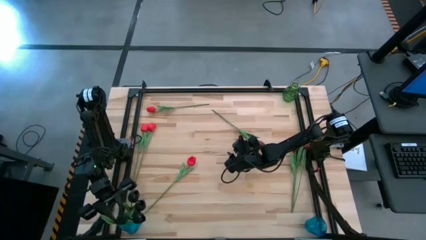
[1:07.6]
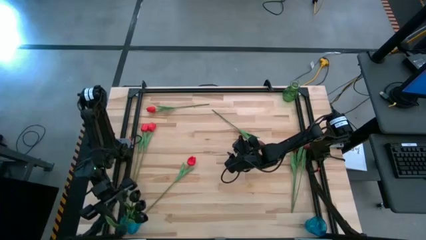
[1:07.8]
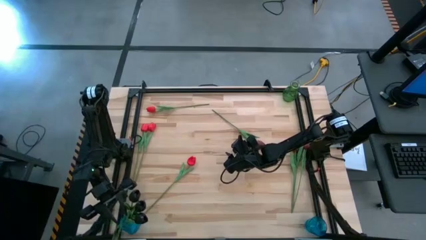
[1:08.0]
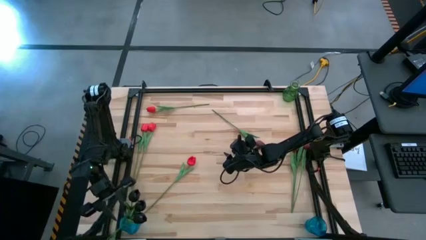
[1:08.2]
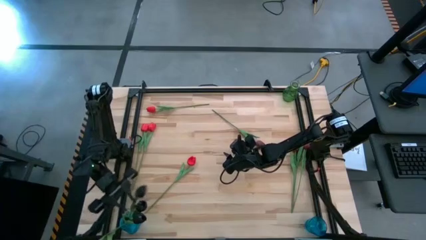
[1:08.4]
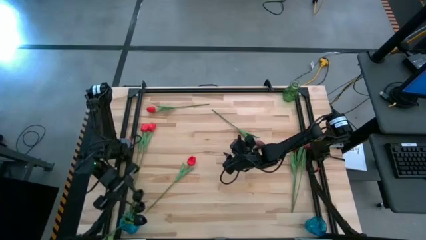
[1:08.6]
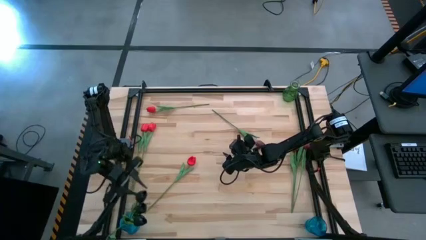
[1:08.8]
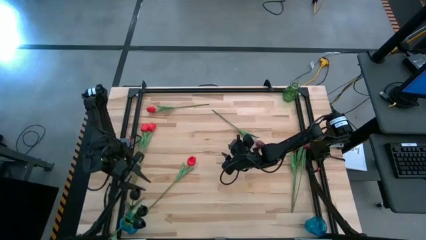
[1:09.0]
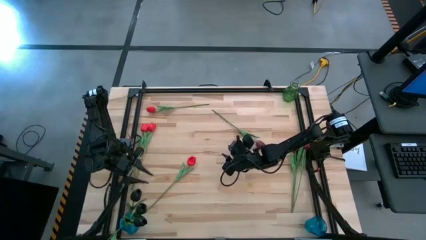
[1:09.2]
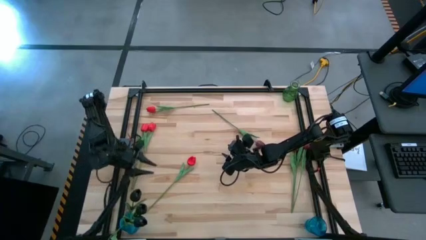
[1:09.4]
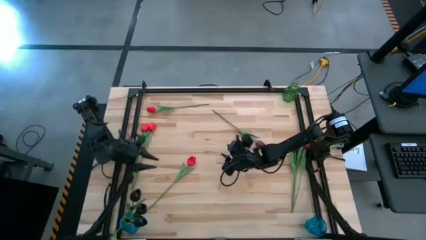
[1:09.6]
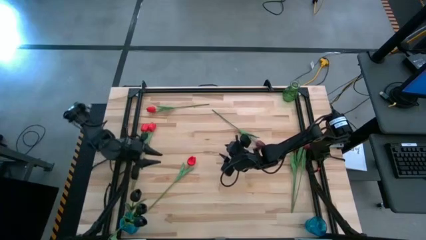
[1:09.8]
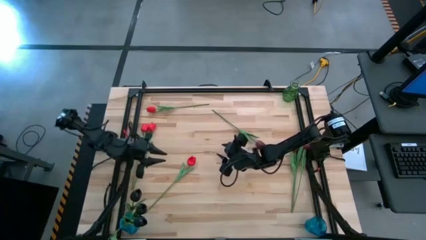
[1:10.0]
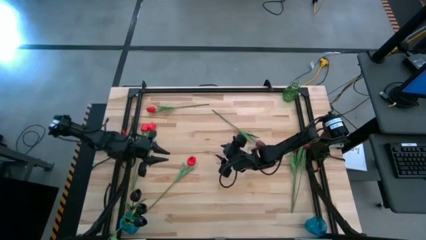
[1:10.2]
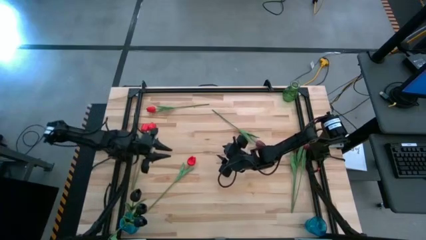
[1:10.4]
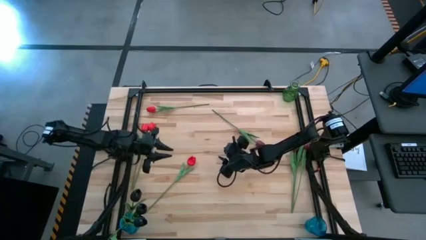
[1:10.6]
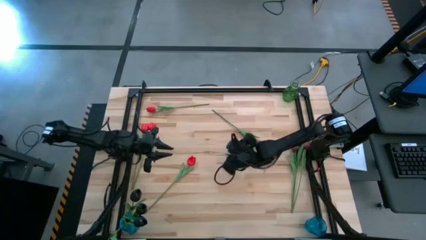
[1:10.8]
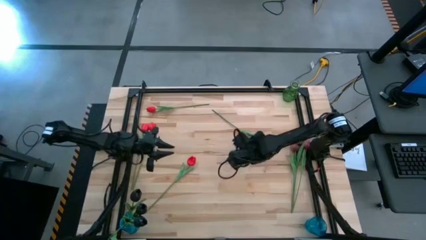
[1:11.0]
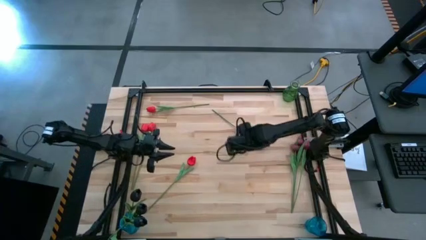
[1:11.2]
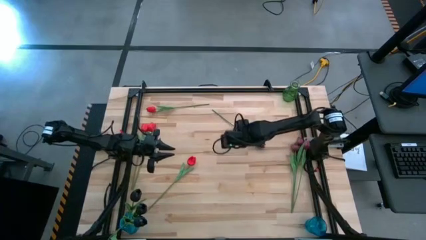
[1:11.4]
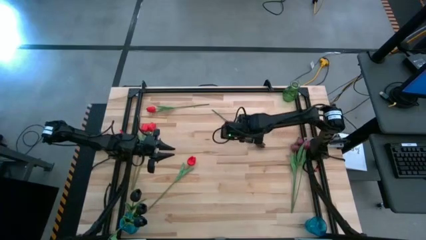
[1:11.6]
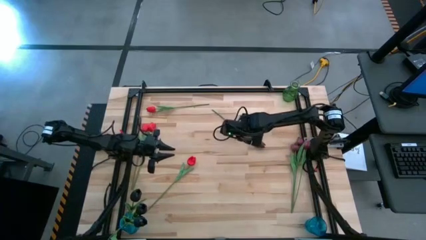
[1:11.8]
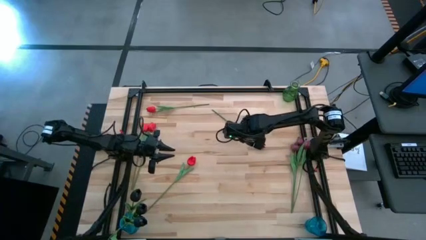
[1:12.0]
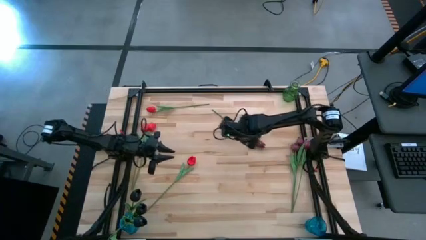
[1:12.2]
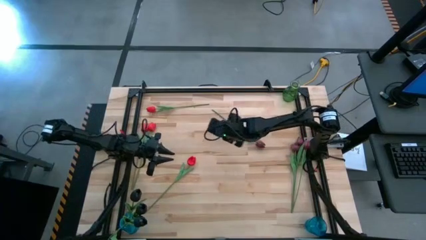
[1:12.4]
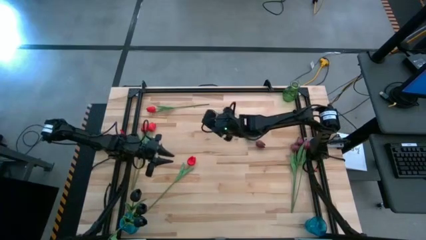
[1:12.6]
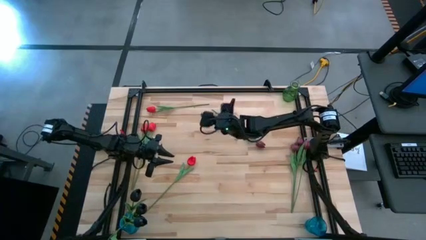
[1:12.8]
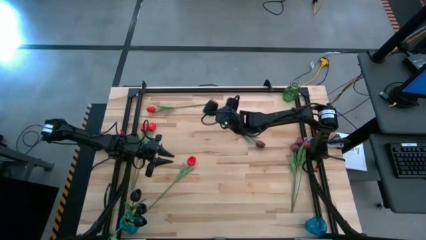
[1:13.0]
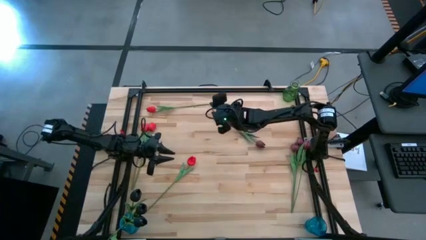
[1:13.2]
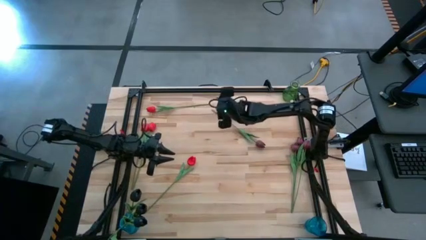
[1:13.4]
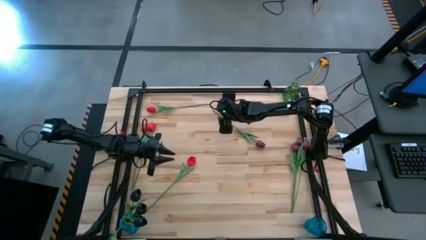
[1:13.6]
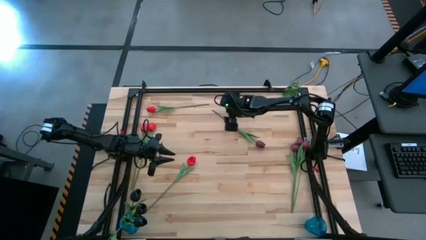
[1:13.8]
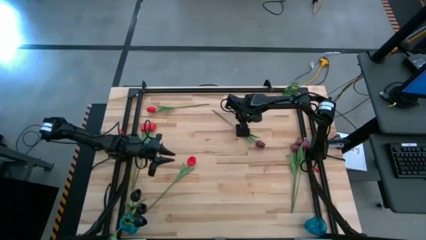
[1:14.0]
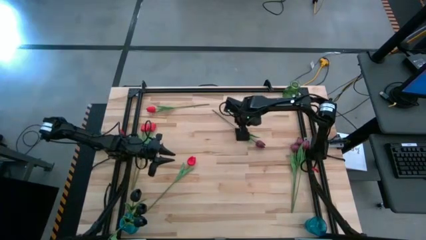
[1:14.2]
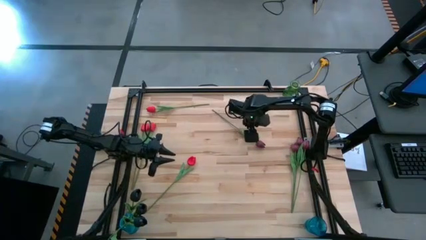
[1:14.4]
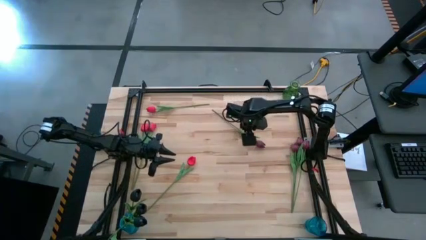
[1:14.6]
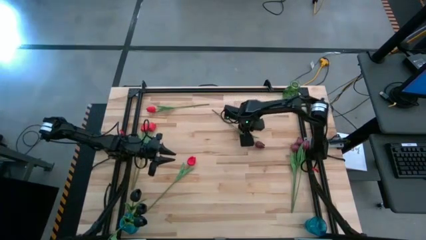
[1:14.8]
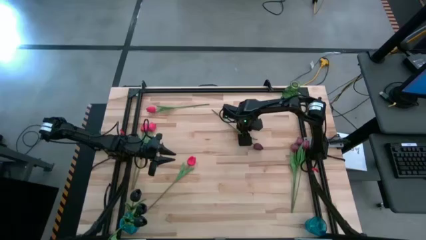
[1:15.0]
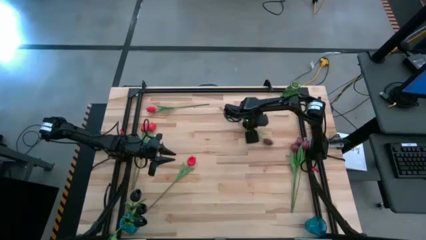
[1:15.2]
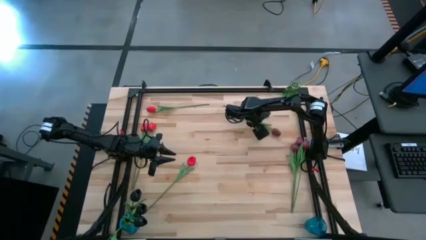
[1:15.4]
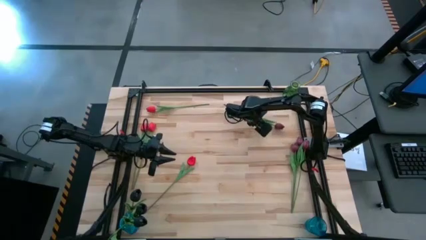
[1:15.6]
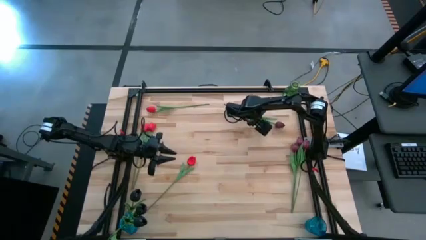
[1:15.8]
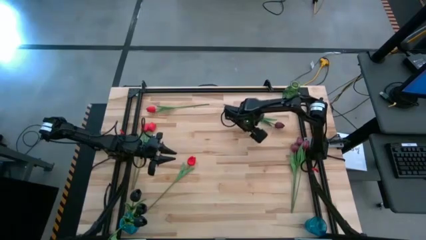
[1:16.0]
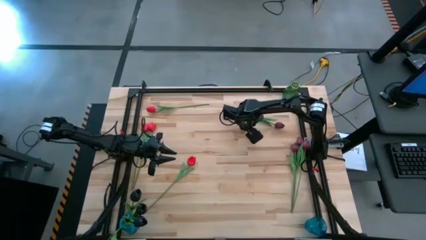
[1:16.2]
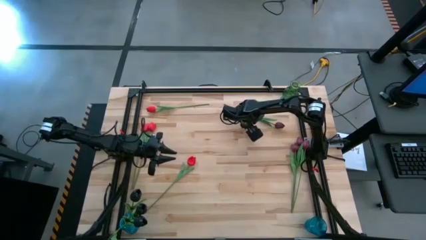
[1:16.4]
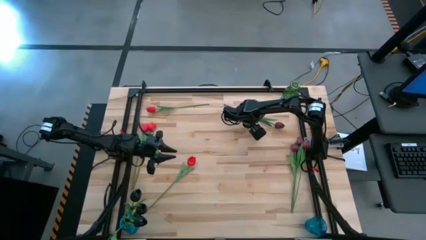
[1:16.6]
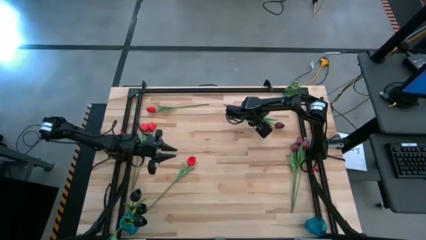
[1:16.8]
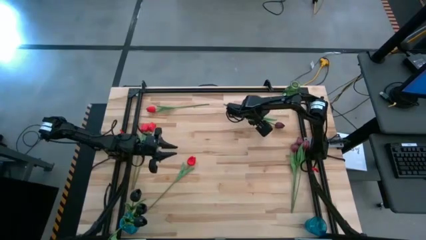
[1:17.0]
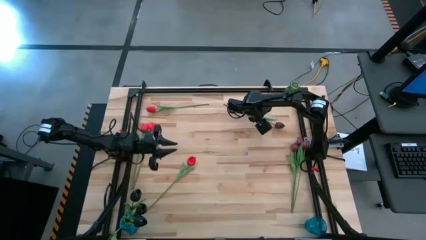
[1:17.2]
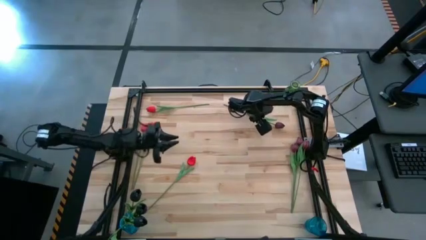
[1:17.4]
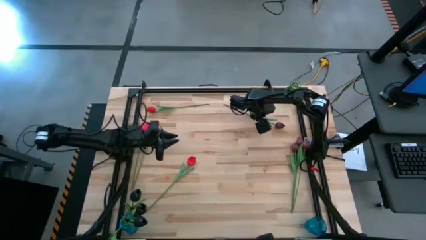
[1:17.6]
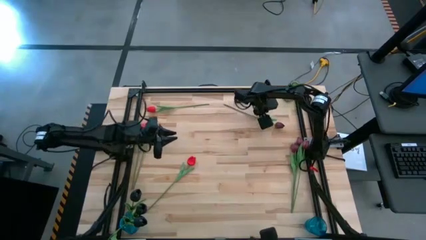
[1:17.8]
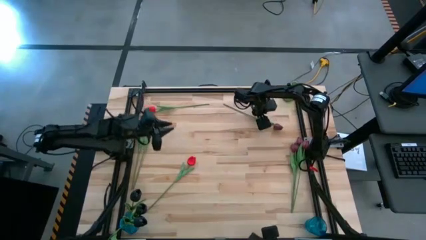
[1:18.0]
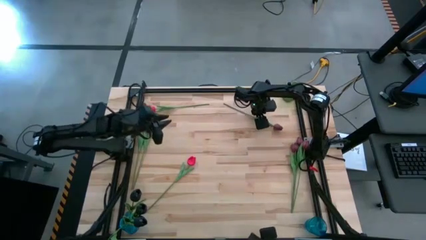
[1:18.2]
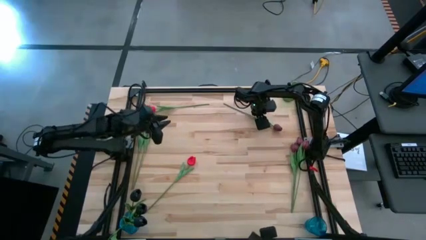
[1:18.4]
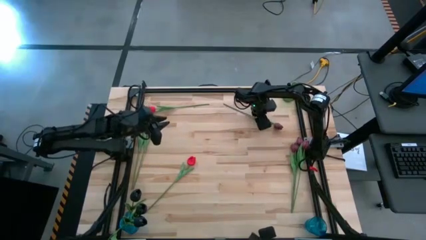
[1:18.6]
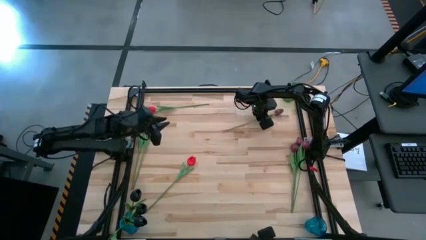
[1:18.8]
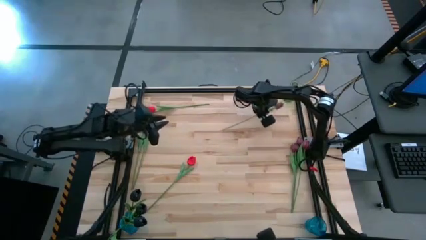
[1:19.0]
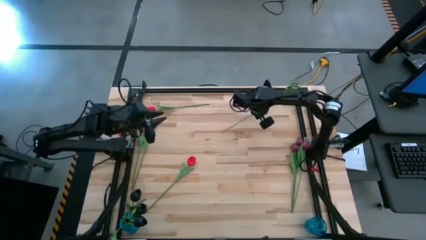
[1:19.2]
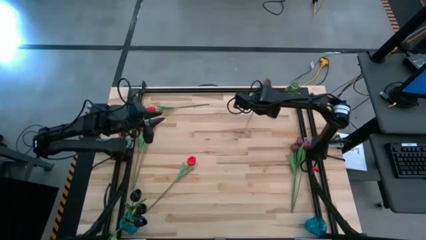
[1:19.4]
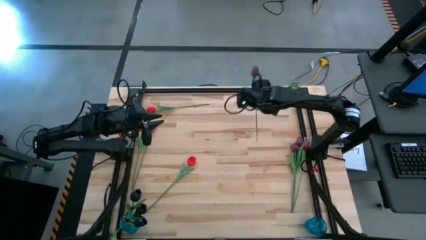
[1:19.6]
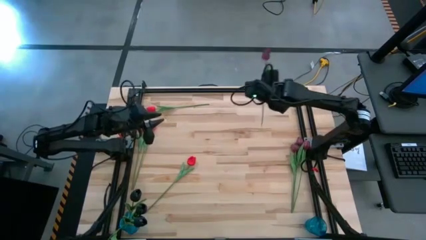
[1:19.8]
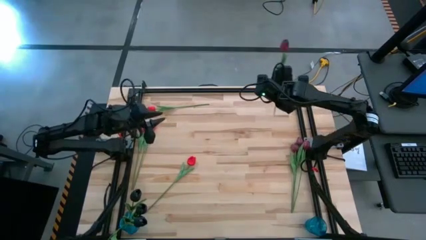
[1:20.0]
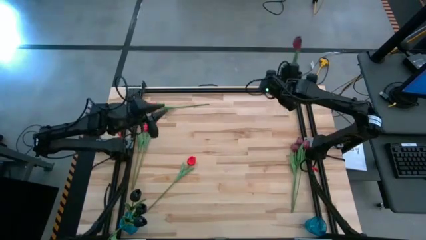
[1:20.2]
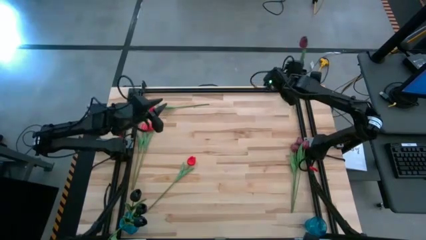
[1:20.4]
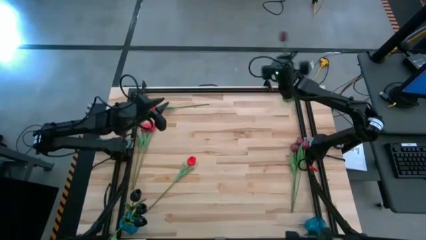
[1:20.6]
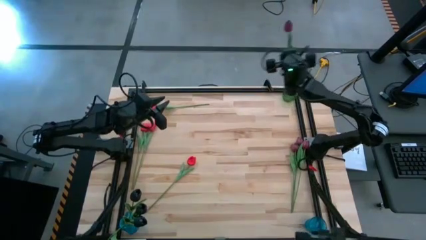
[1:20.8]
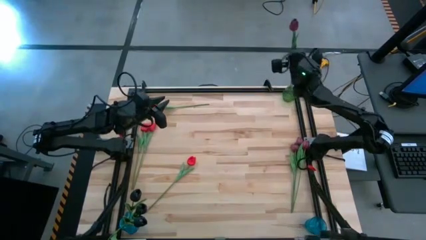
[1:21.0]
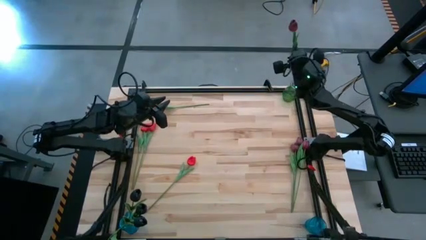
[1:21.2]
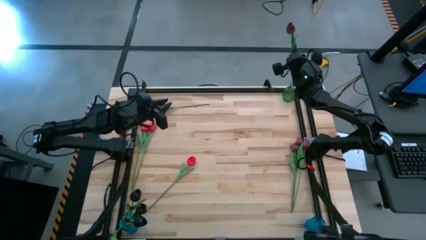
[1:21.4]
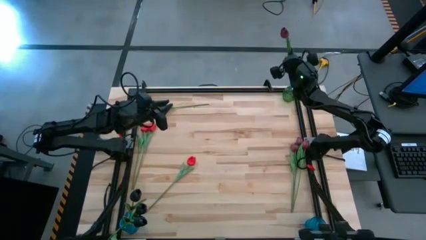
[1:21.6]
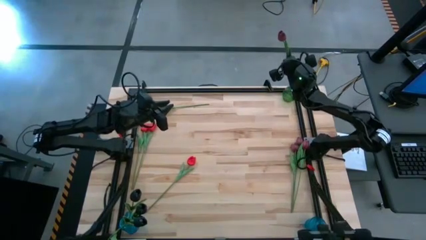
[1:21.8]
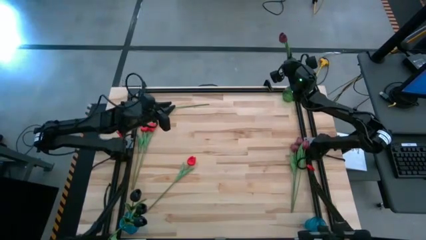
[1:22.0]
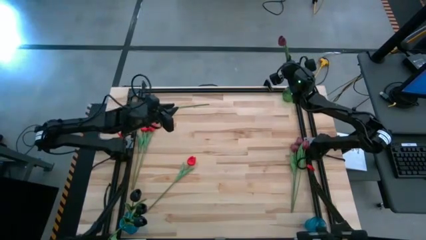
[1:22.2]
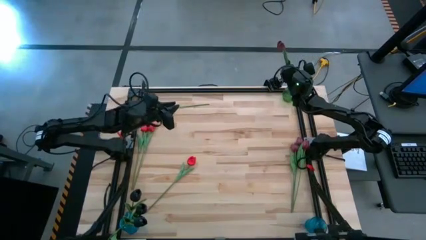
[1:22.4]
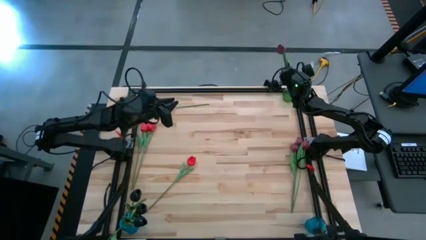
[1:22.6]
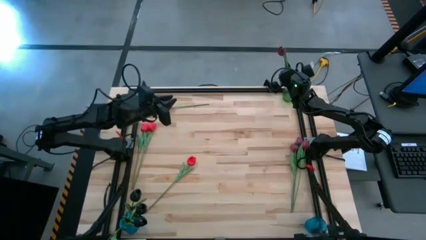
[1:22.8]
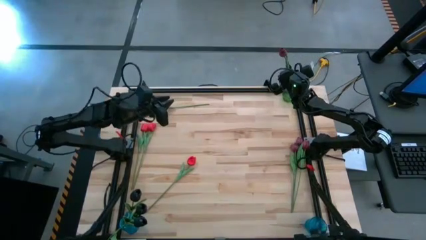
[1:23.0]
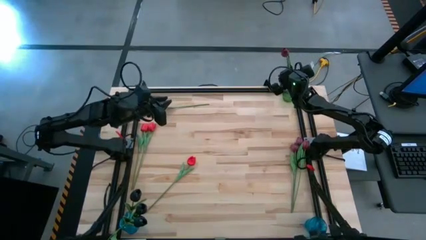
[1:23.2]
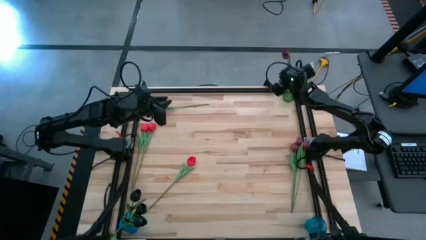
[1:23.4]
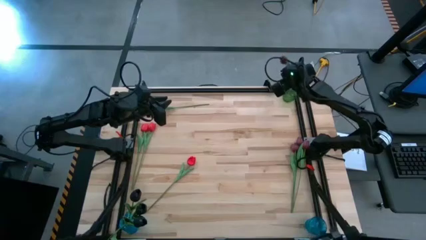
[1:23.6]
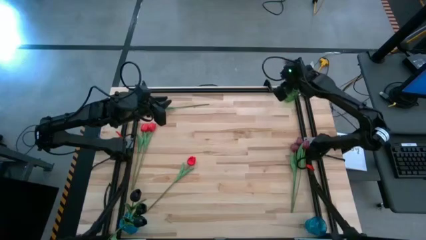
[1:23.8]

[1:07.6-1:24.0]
Task: Sort flowers into vase by color
Put the dark red tulip into the green vase
